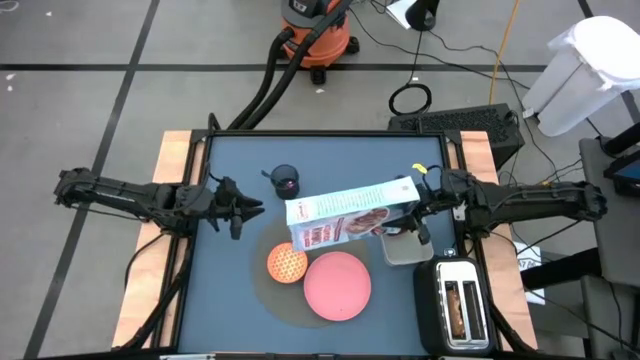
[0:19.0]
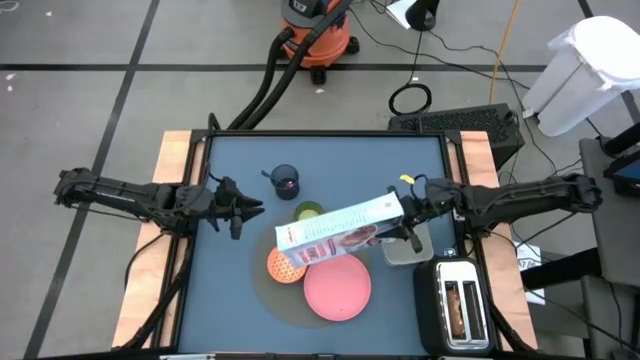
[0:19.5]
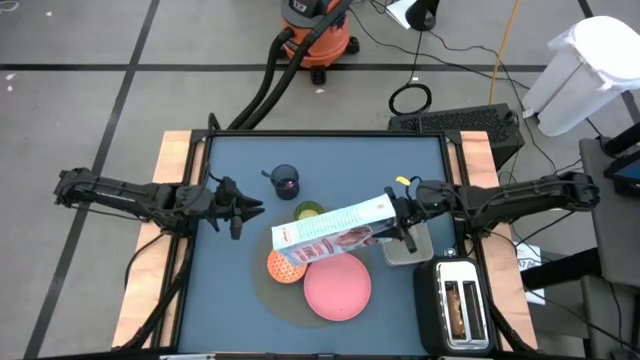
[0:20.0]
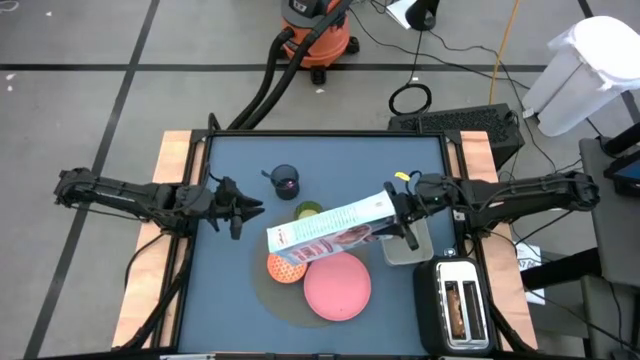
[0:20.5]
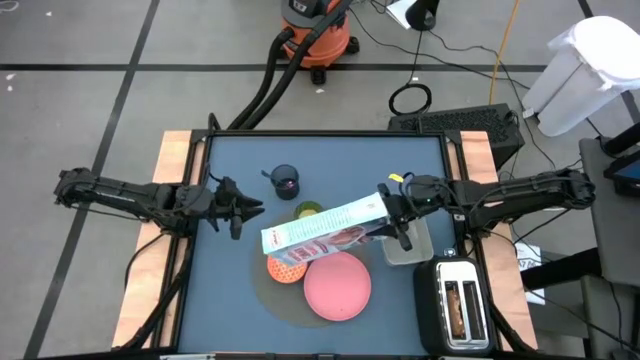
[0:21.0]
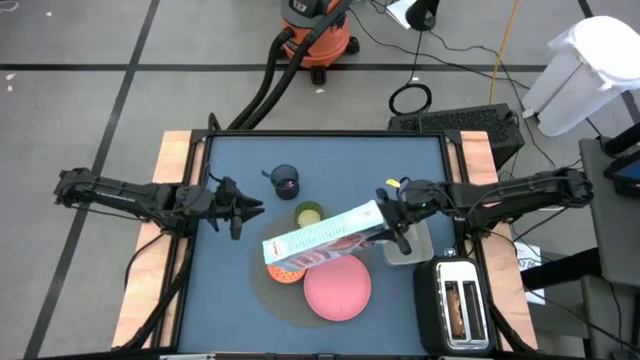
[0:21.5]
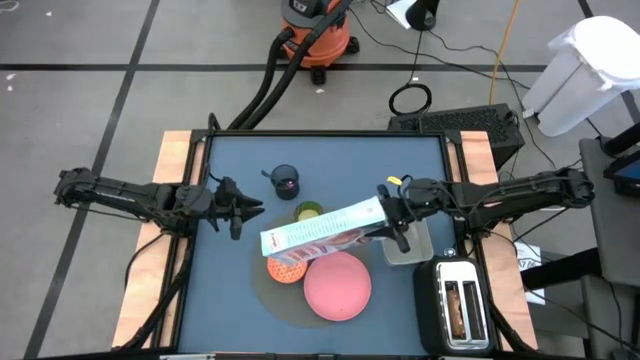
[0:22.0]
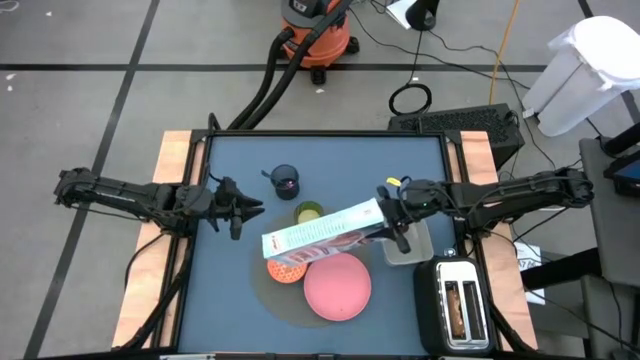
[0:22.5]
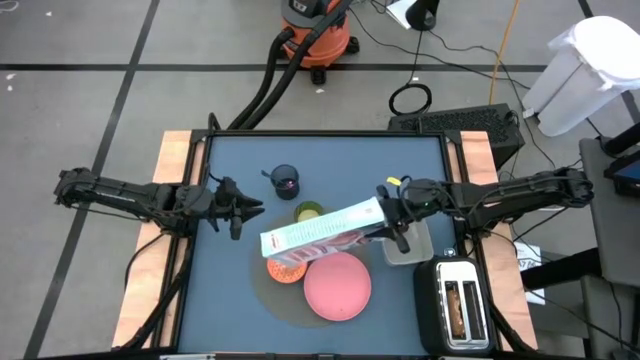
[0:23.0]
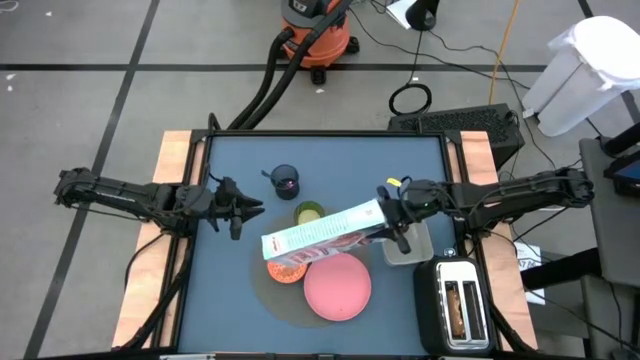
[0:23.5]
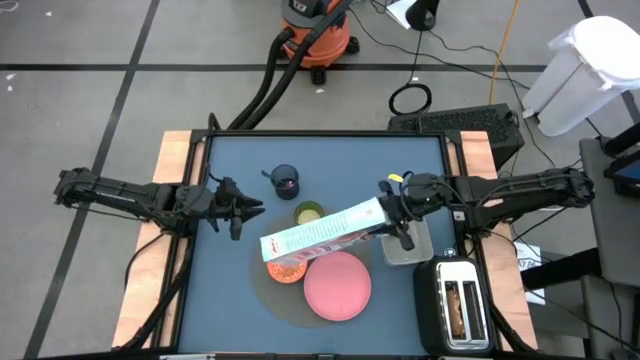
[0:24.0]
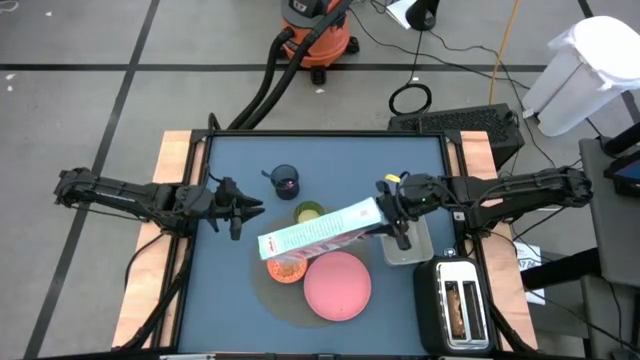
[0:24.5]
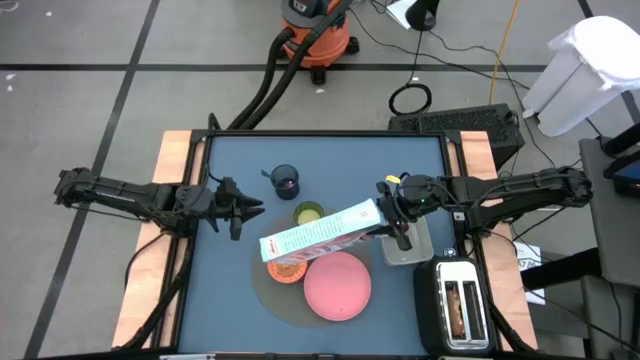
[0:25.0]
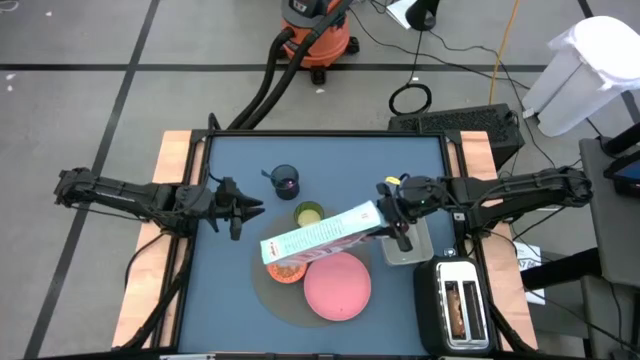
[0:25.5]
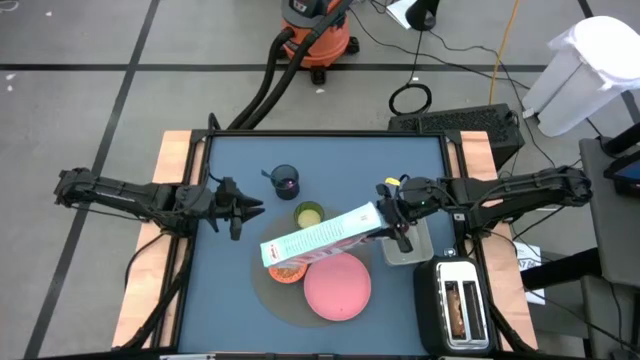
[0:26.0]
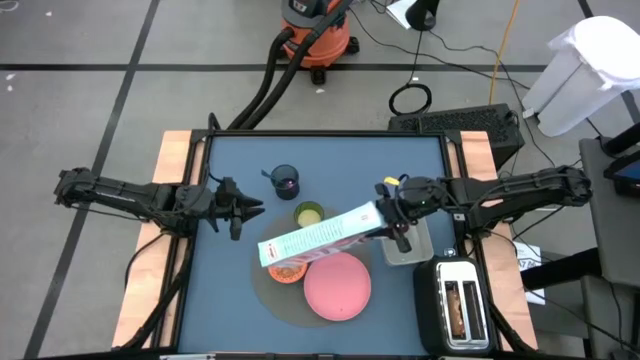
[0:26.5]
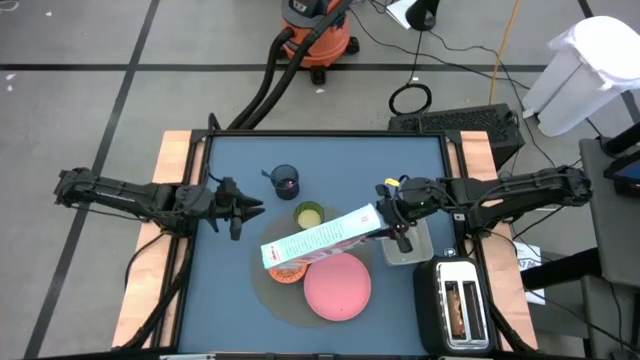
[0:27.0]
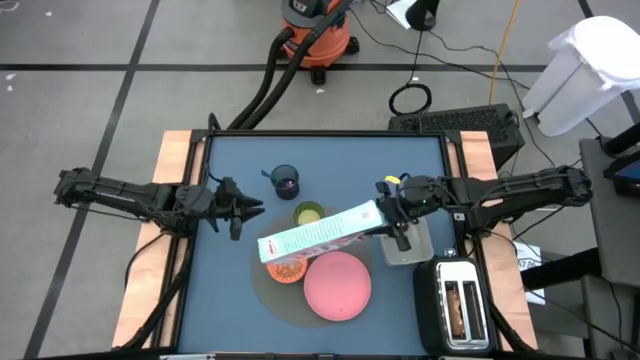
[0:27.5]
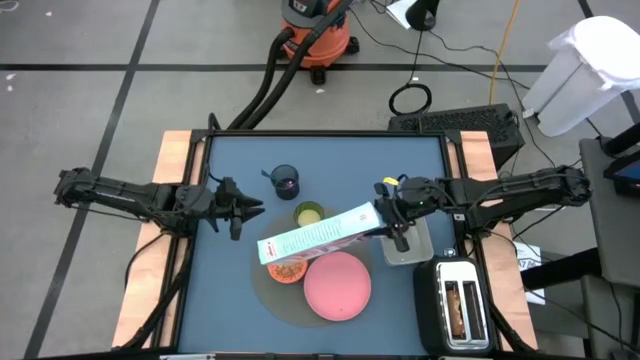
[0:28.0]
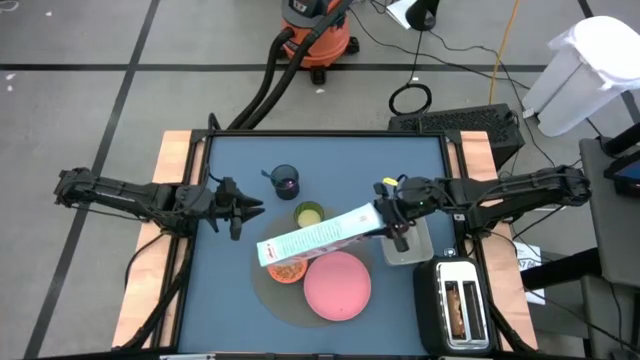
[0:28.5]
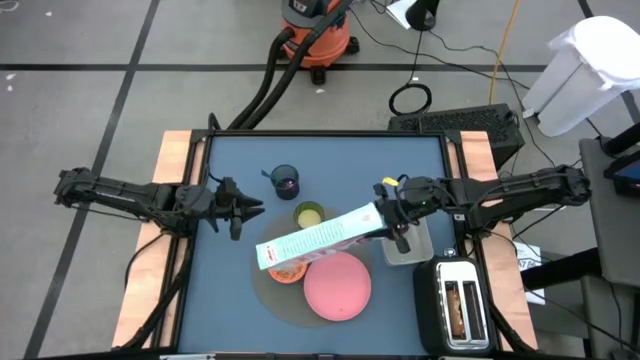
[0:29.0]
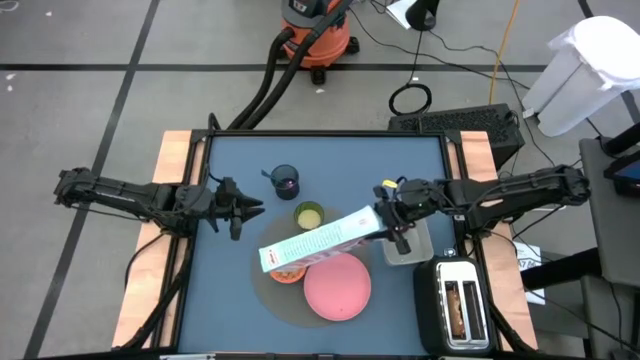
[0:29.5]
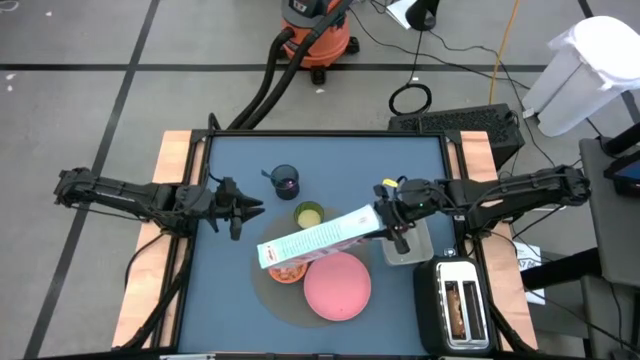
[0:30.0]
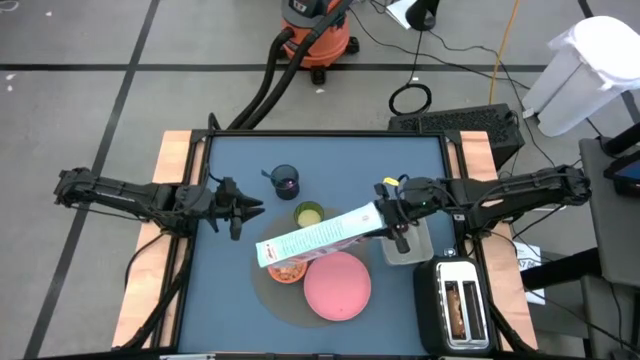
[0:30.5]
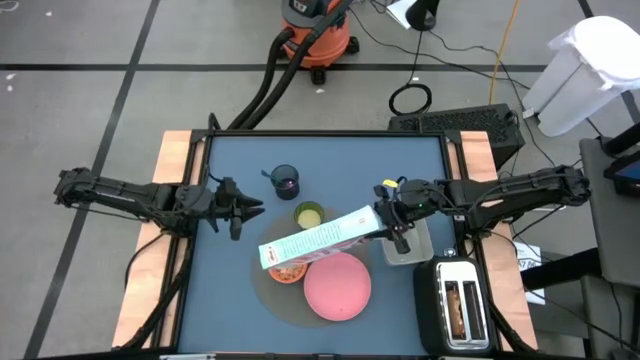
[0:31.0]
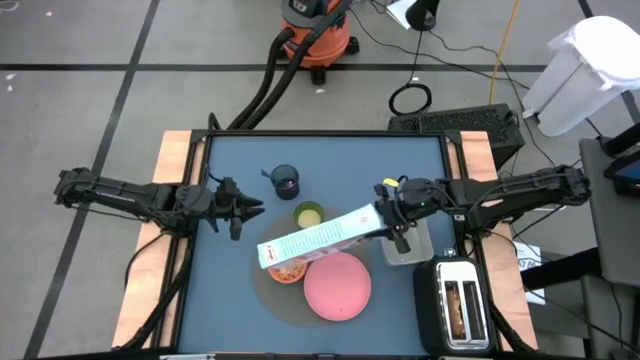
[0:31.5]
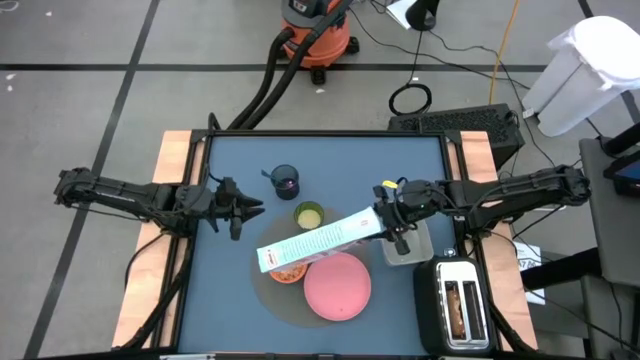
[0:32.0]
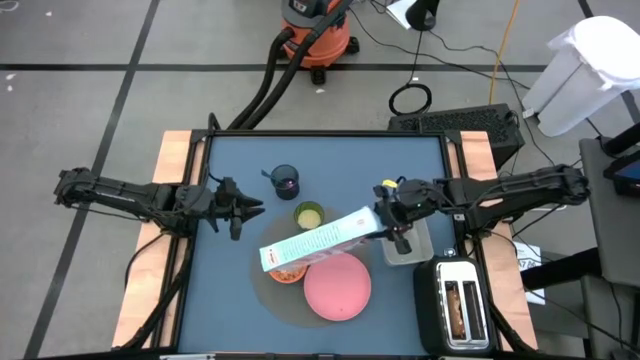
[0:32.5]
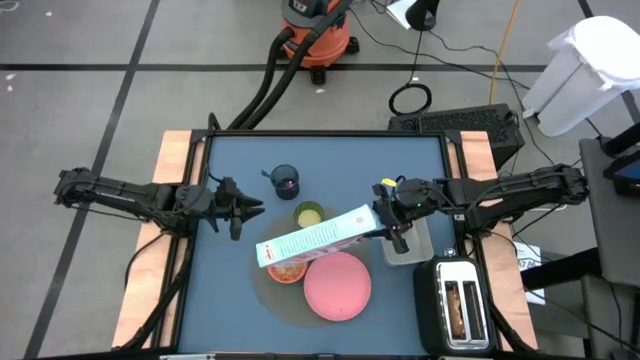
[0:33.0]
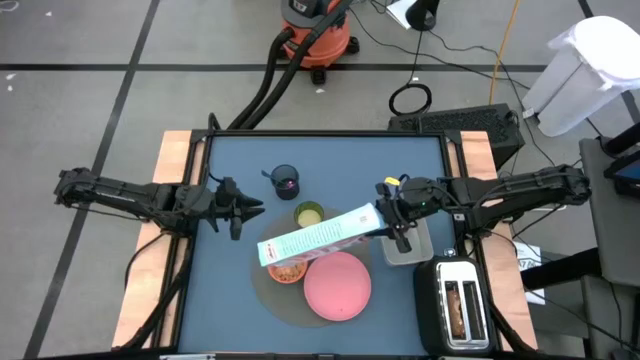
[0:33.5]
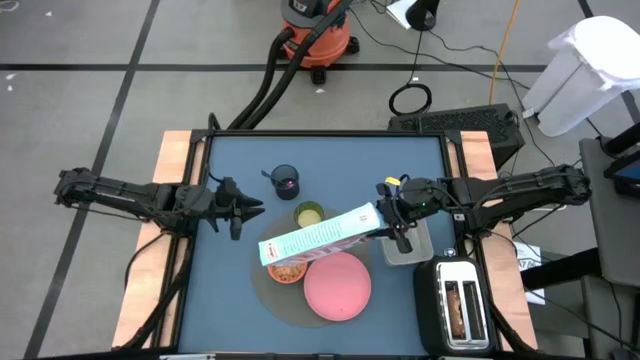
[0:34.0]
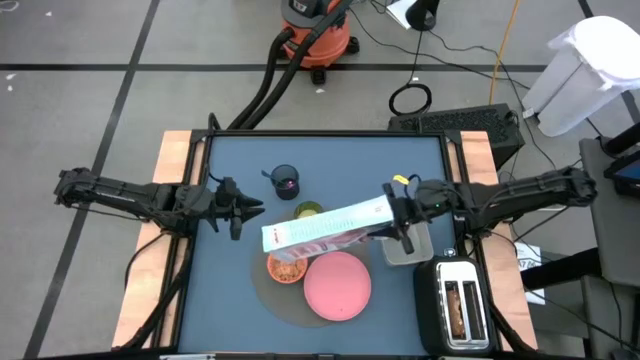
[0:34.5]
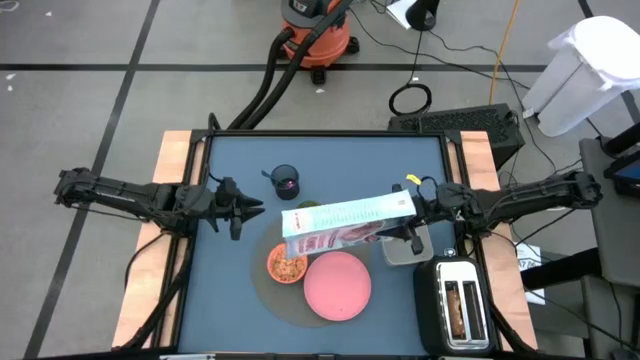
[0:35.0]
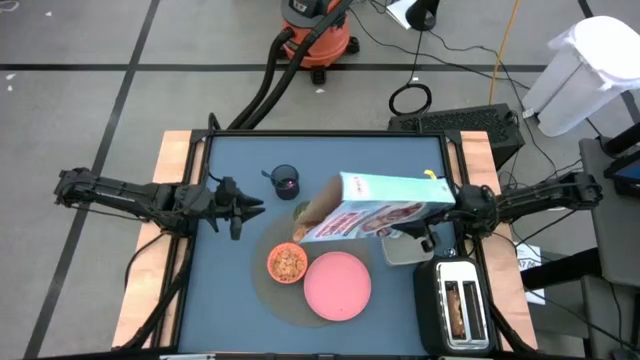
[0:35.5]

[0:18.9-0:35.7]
Task: Arrange a breakfast setting
Pour the cereal from the cereal box into the red bowl

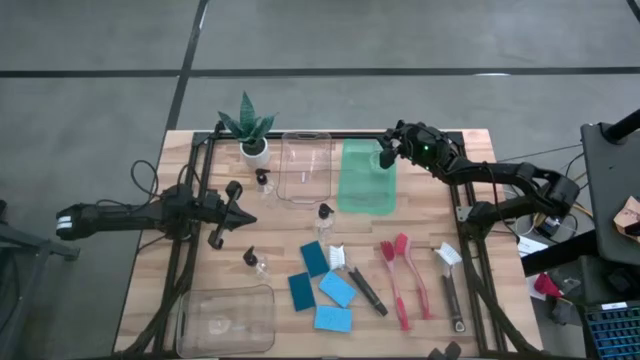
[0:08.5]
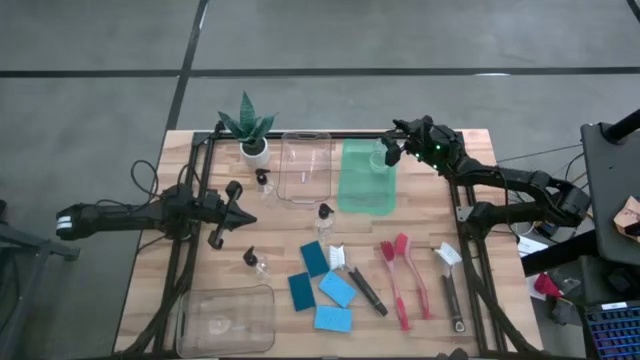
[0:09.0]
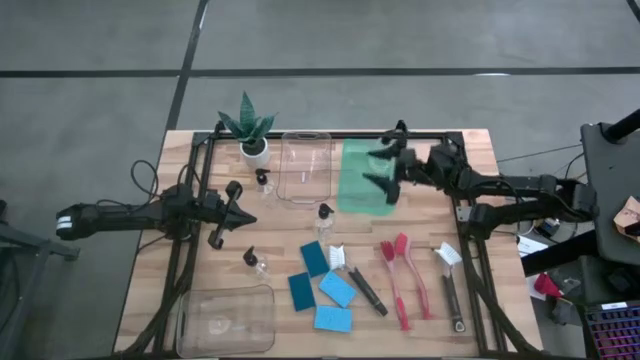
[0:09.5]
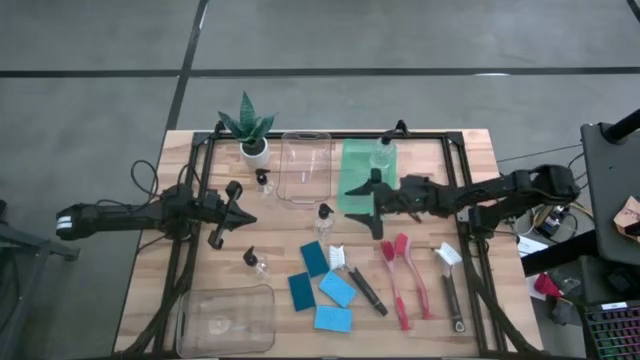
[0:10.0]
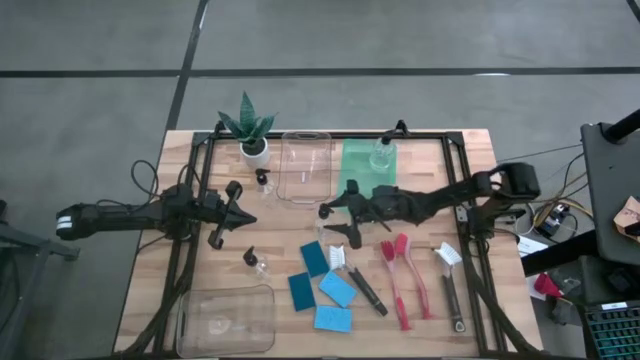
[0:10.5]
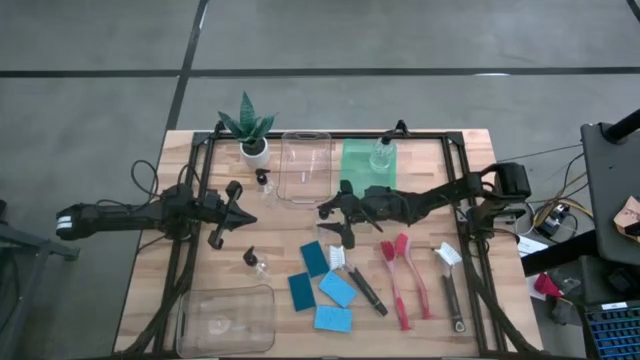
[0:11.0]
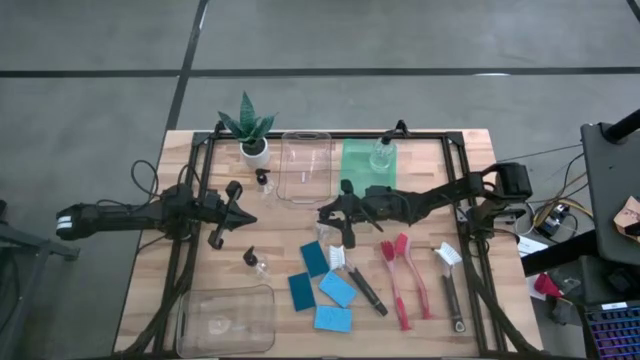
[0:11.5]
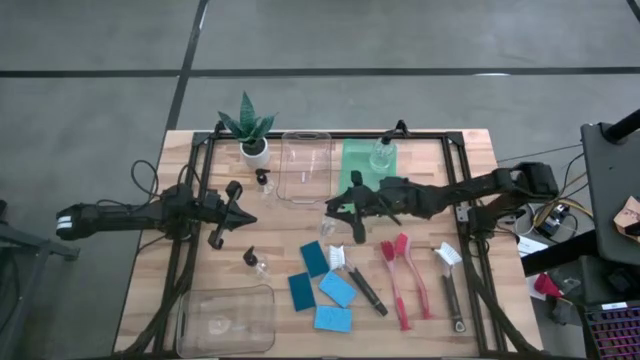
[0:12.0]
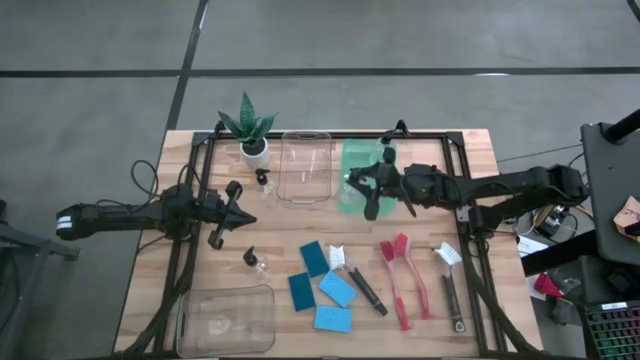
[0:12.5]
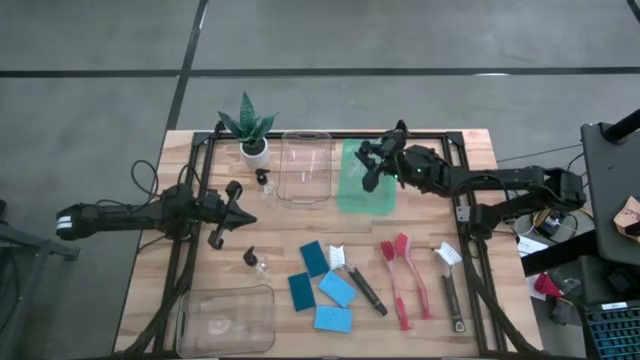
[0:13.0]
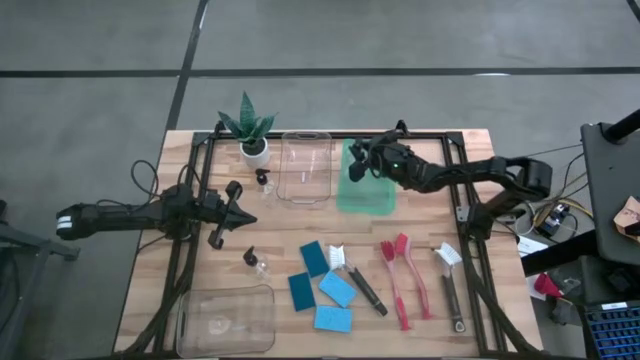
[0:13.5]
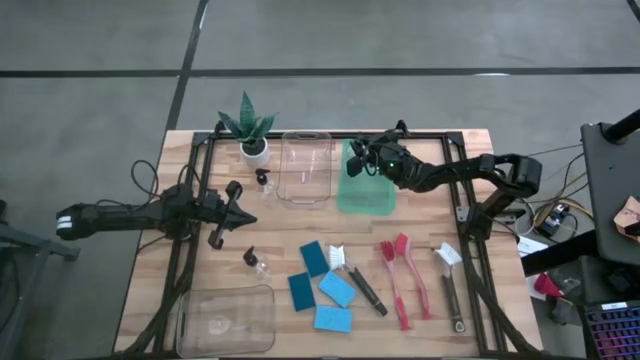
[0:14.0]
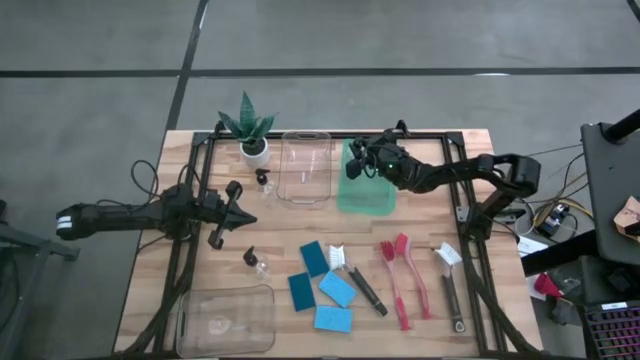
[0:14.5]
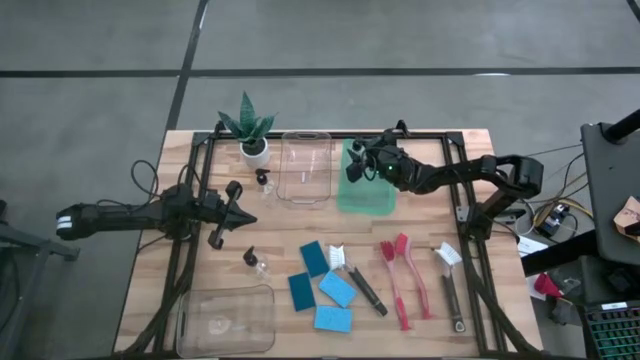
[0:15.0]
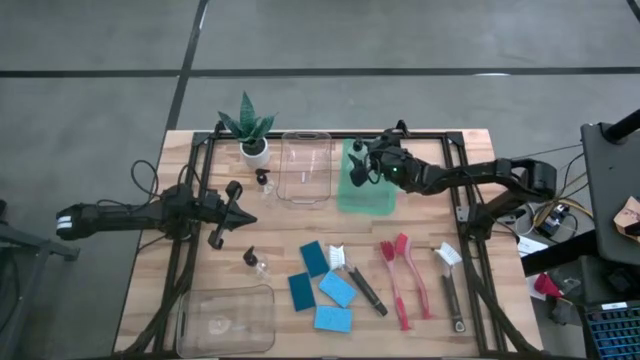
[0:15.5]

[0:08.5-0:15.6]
Task: Pick & Place Kitchen Sink Supplies
Put the transparent soap dispenser into the green bin
